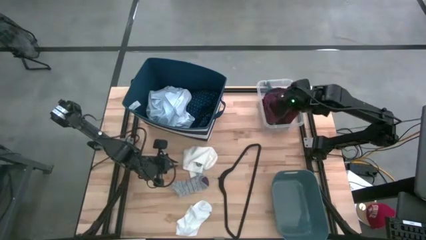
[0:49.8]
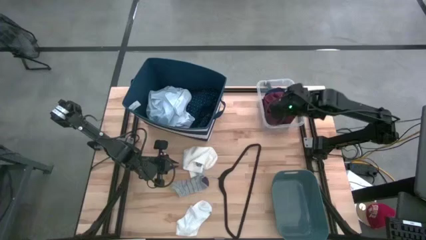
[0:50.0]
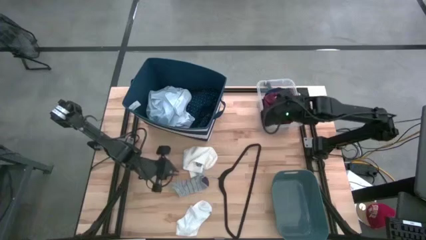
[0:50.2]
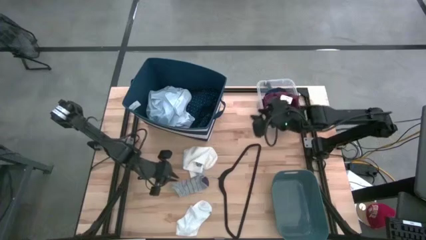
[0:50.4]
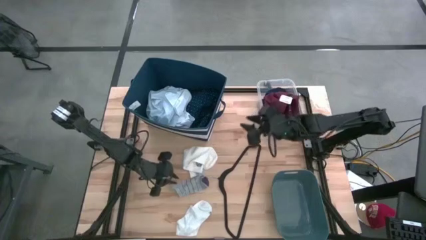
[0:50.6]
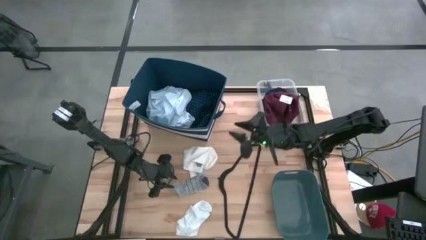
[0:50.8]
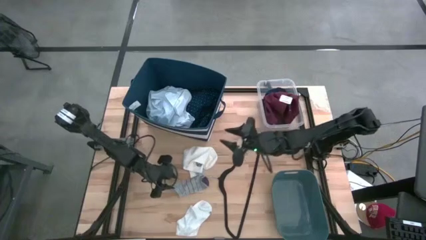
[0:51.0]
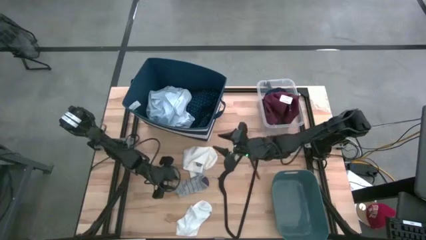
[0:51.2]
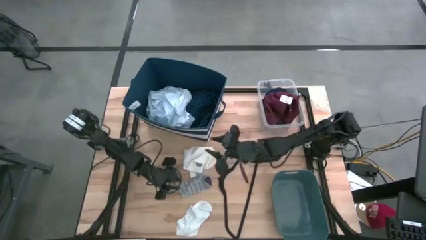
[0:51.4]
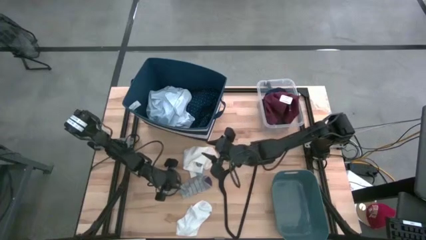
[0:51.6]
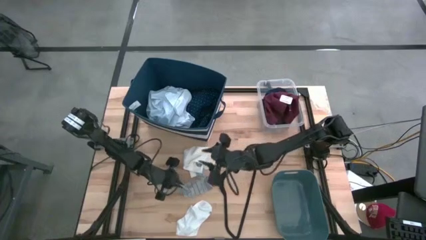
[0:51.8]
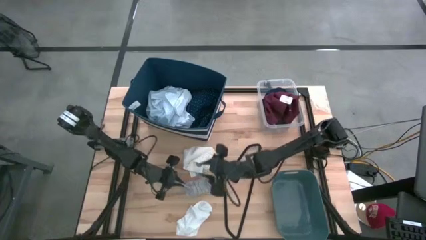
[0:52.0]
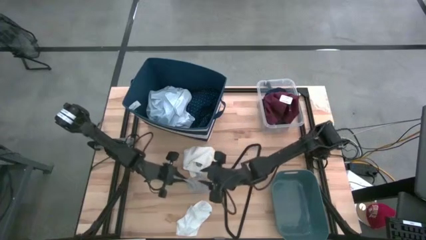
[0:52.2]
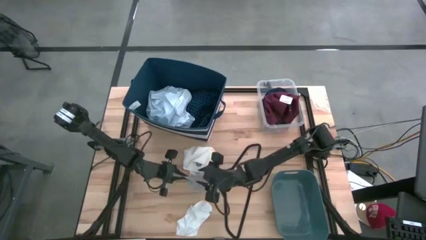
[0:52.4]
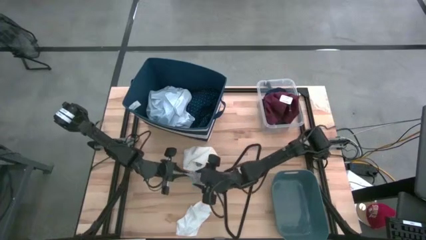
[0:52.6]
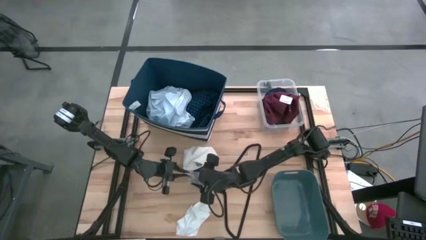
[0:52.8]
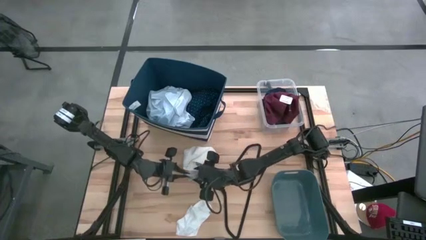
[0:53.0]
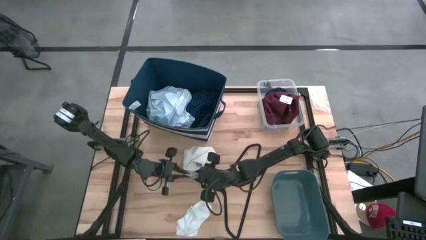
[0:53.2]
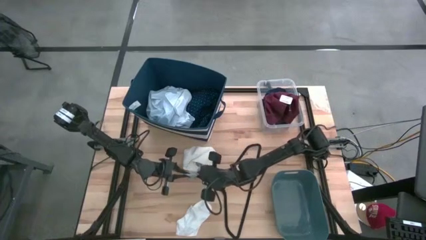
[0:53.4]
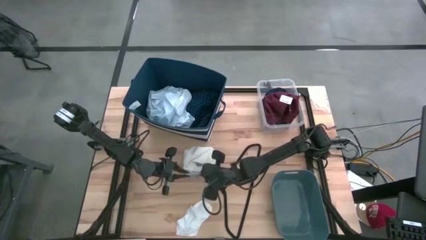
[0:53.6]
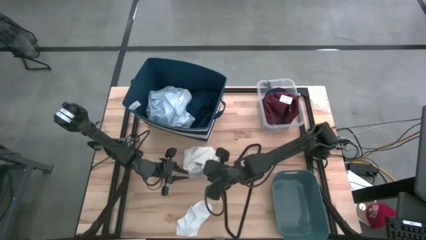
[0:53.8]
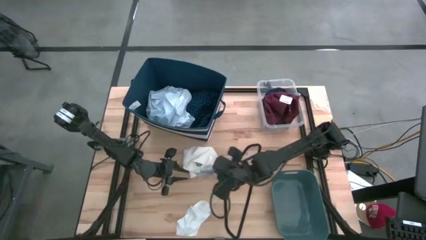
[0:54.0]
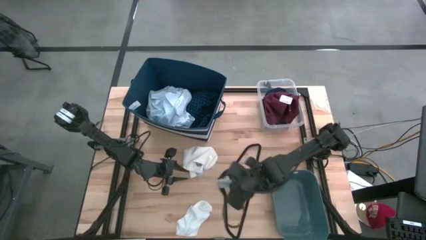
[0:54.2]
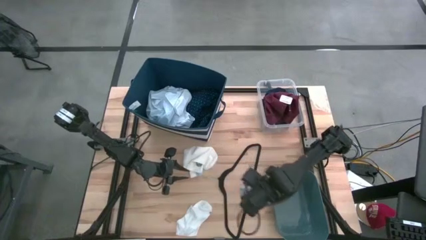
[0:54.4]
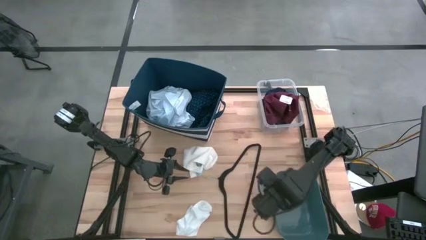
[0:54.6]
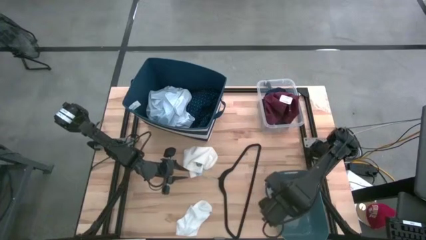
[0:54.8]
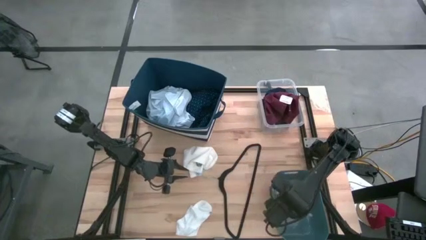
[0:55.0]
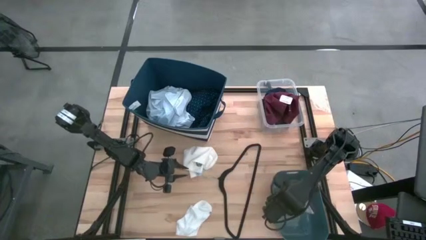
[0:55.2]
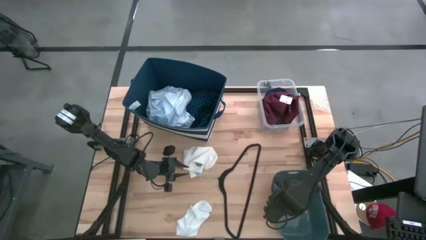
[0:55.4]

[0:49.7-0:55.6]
Task: Pick & Place Cloths
Put the gray sock into the dark blue bin

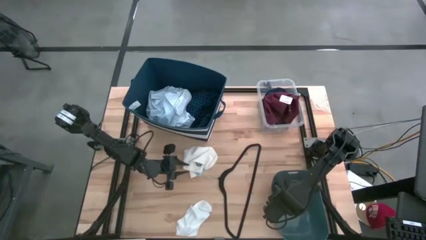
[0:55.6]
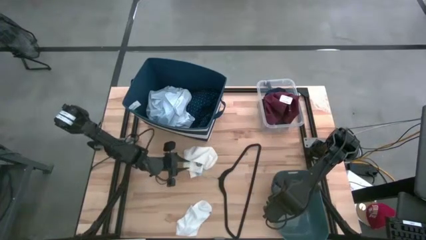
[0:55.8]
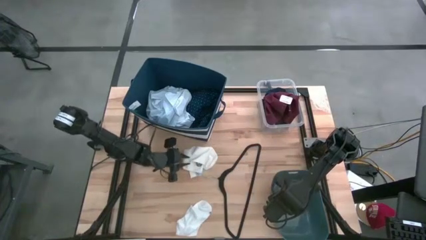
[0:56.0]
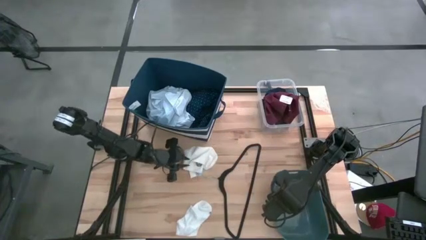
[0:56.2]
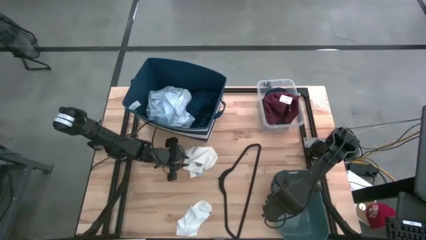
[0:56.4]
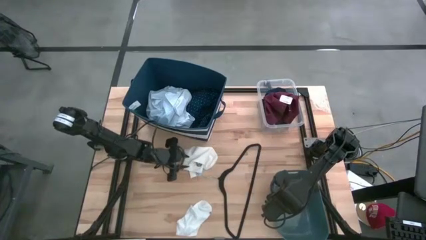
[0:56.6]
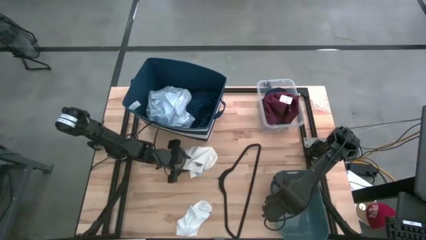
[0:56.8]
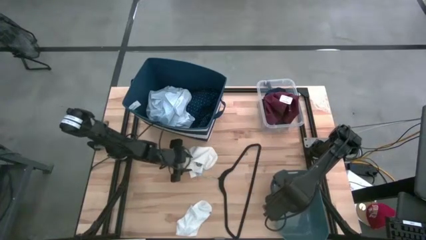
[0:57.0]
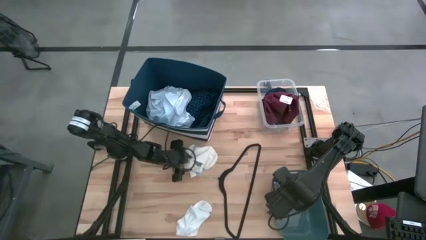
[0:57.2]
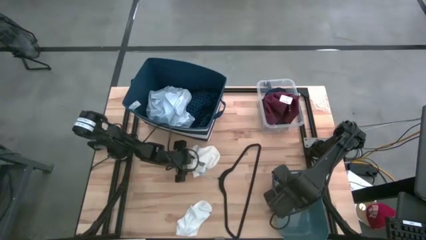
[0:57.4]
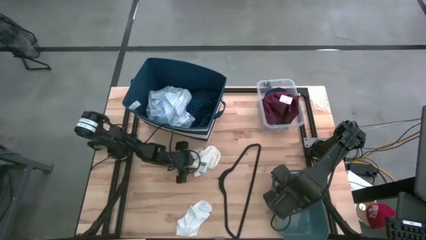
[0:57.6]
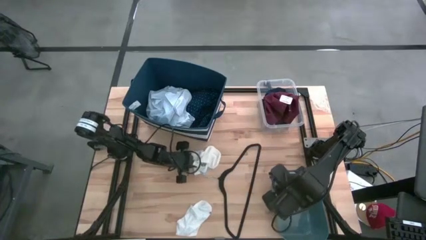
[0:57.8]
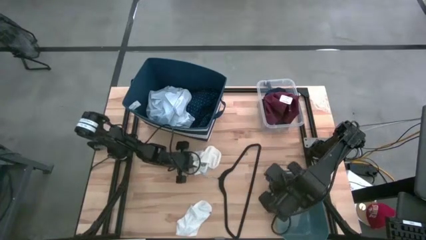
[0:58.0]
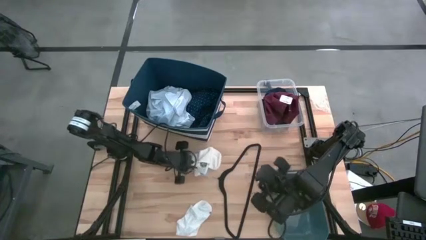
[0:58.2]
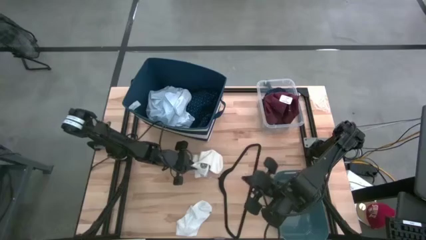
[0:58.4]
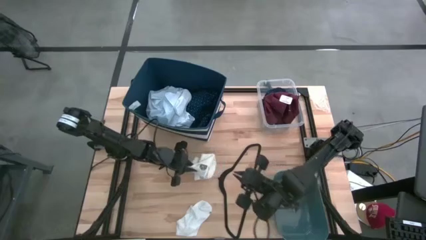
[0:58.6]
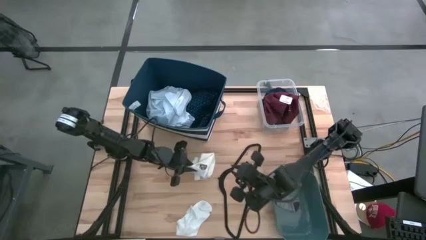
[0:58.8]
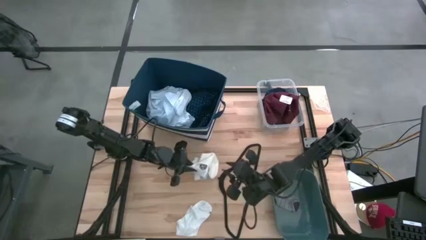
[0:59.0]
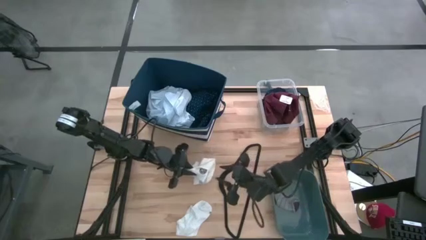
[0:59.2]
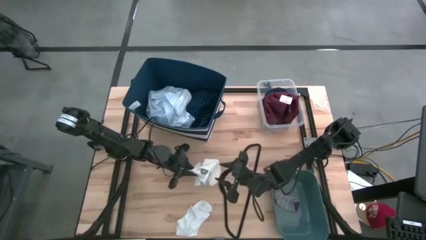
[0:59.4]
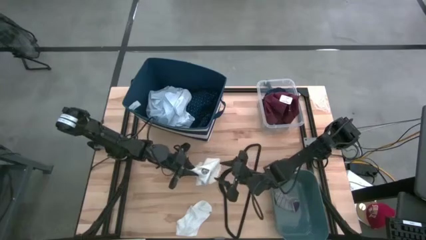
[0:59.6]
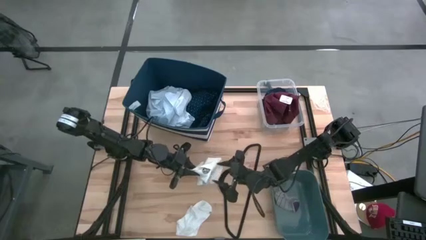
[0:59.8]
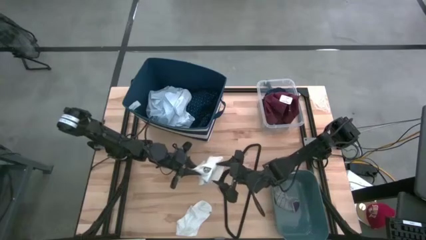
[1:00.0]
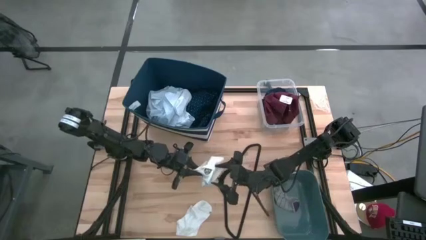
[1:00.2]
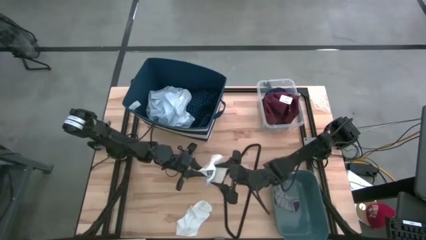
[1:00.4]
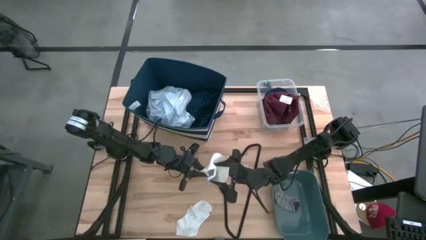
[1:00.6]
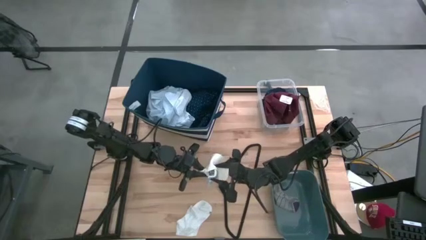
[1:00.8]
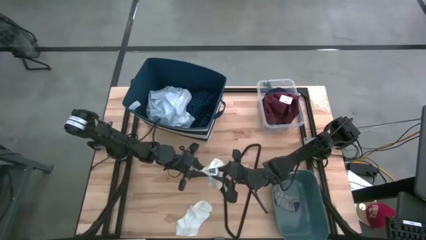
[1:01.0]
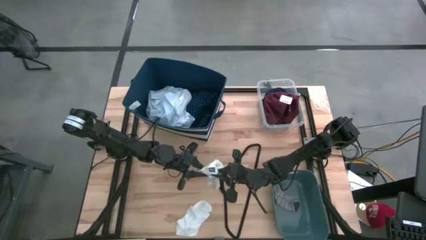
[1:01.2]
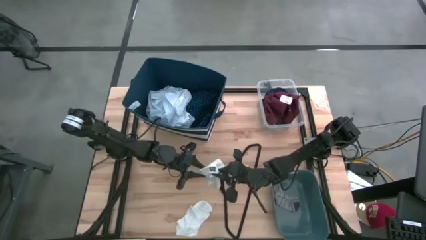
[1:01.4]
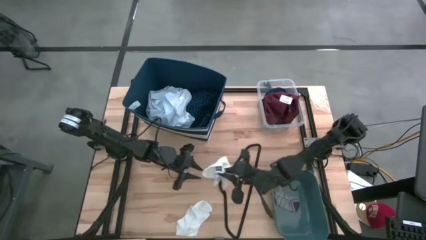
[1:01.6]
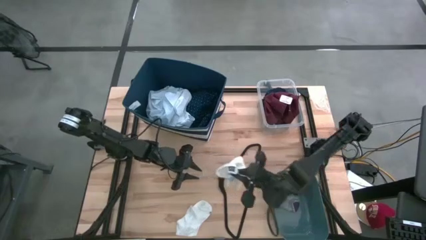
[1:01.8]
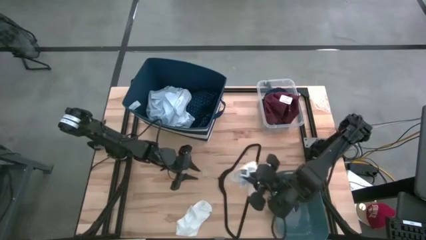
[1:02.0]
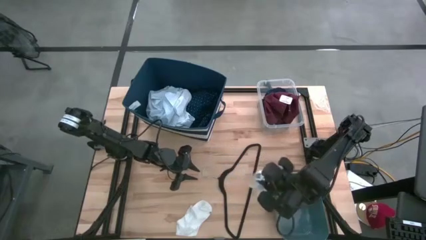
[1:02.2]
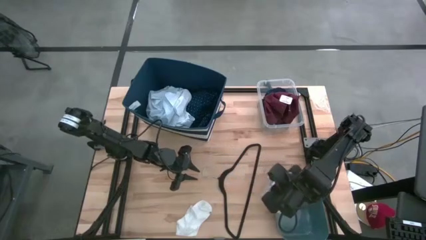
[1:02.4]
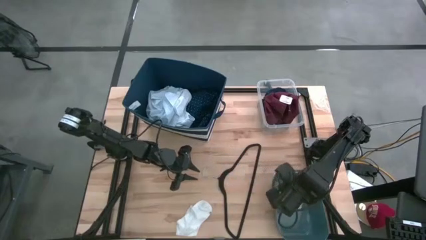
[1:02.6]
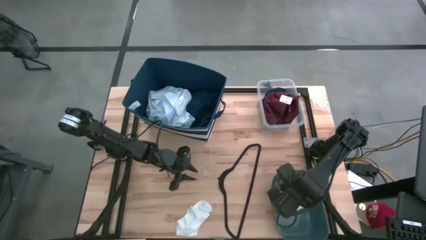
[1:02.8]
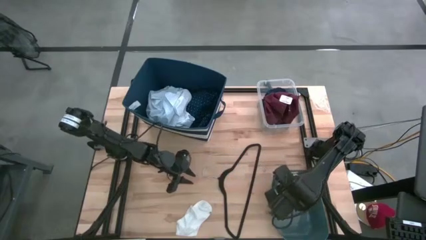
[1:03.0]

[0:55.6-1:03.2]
Put the top white and blue sock into the dark blue bin

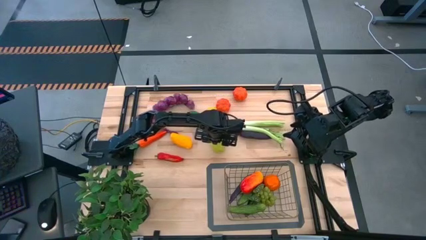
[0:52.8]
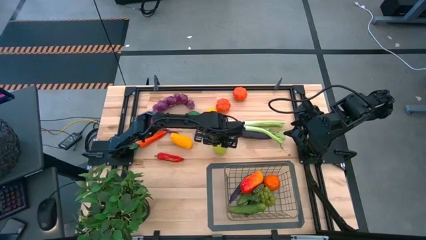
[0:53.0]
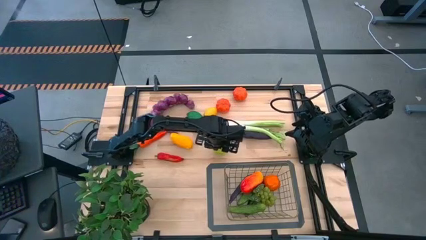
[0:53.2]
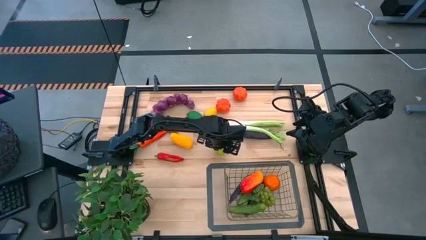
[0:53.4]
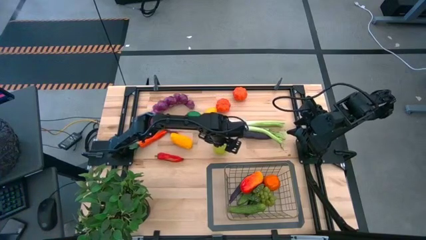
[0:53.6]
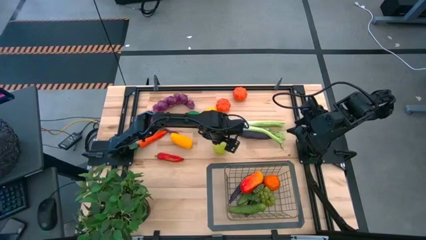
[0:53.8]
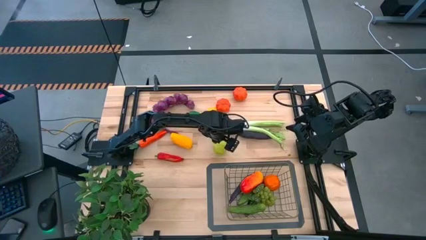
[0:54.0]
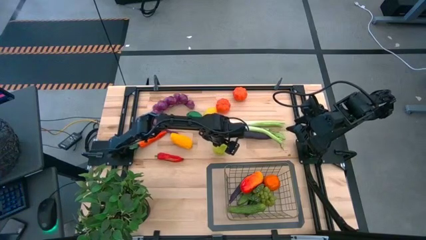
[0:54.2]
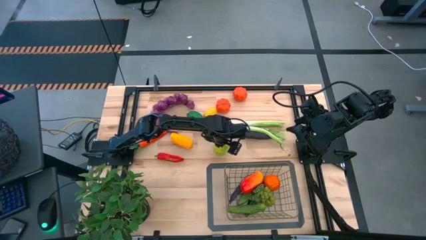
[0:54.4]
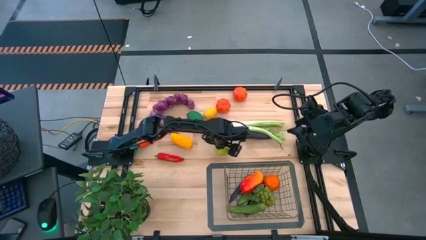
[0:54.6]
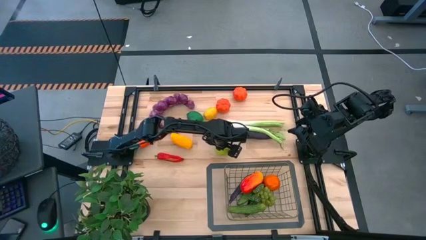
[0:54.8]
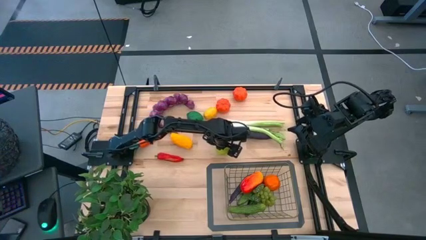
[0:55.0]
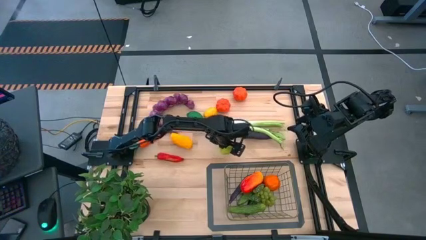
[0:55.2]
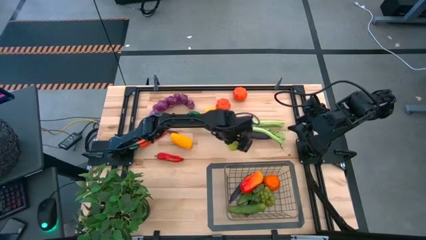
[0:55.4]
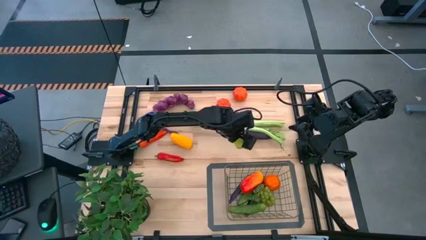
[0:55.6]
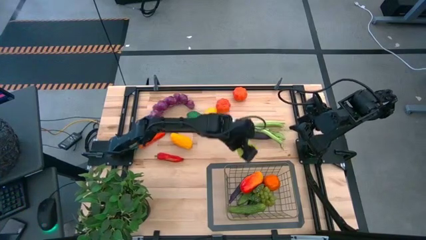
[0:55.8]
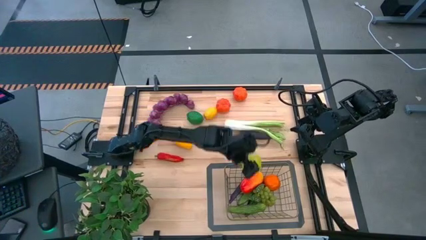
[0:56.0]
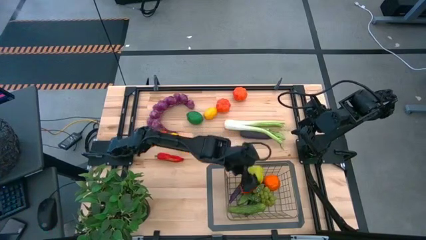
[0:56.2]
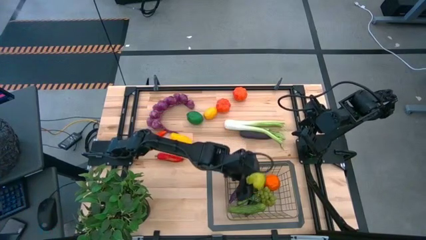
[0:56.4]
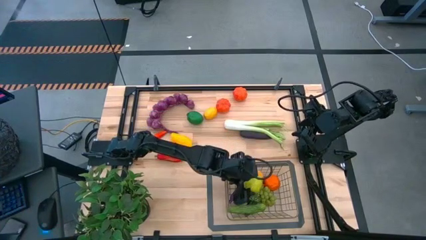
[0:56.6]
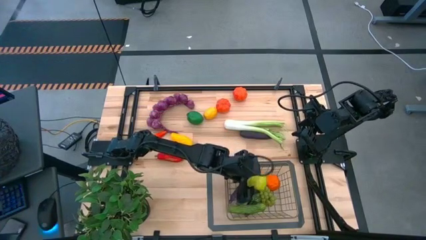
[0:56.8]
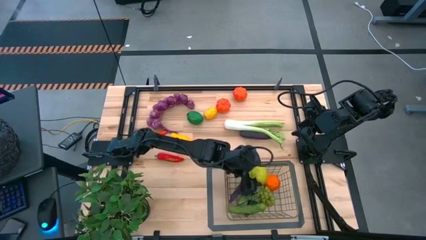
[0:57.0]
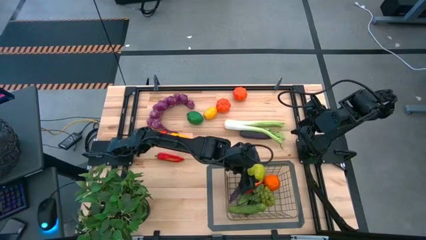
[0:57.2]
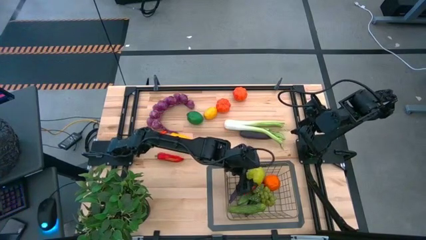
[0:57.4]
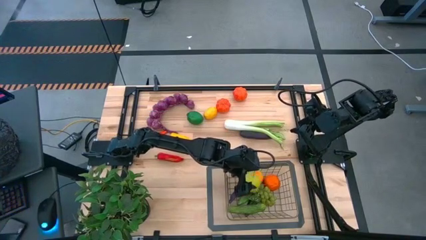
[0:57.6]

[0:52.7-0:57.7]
Task: Build produce basket
Put the apple into the wire basket
